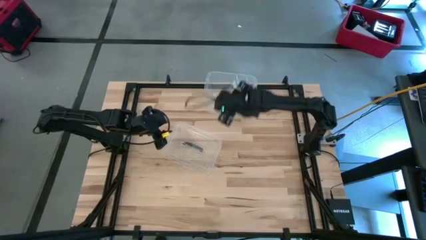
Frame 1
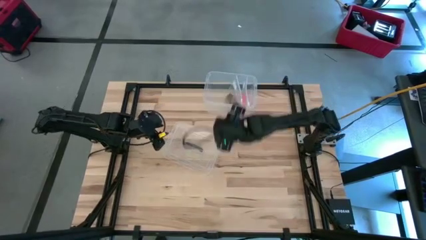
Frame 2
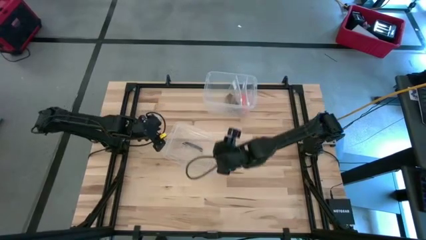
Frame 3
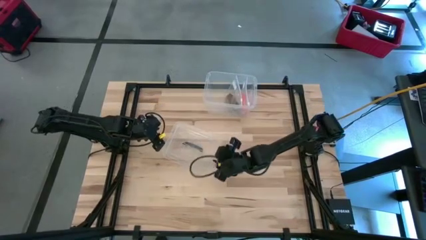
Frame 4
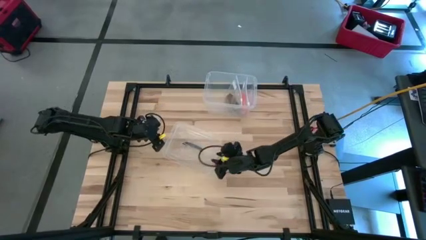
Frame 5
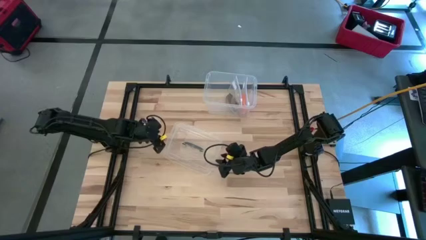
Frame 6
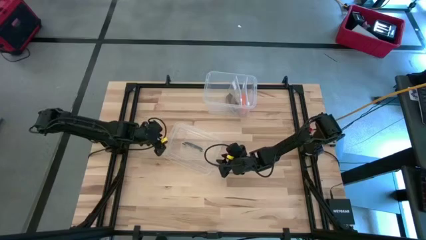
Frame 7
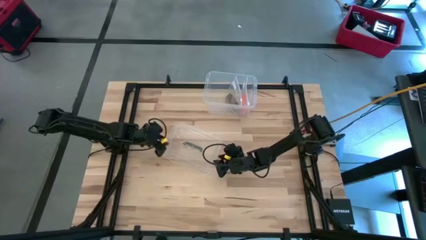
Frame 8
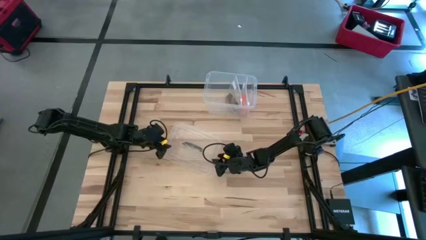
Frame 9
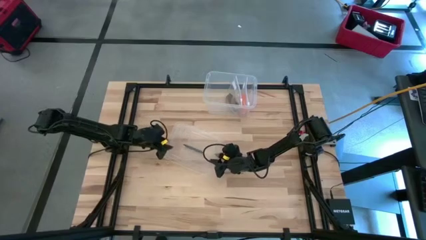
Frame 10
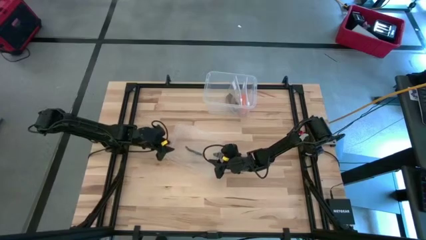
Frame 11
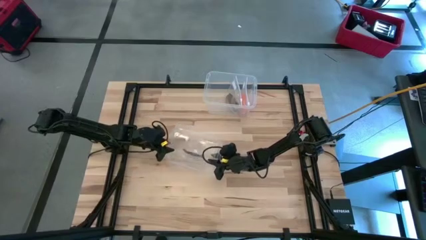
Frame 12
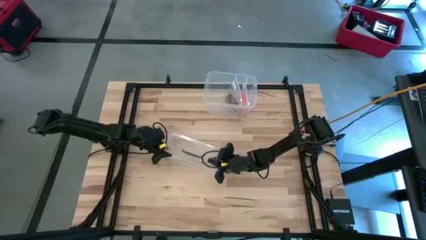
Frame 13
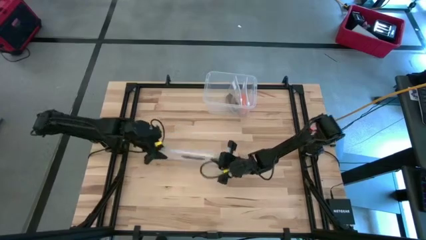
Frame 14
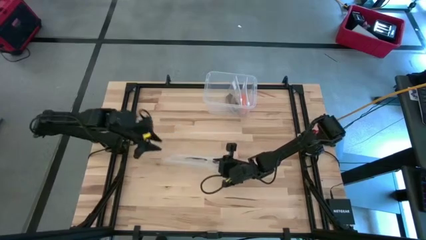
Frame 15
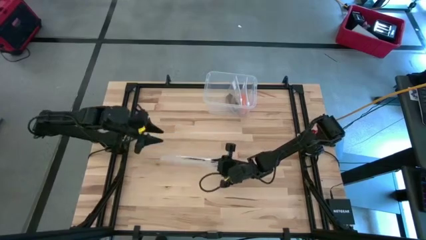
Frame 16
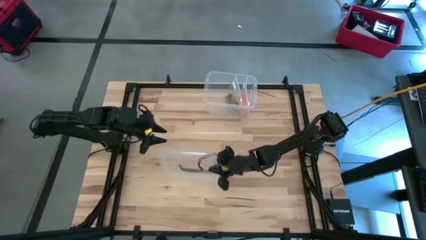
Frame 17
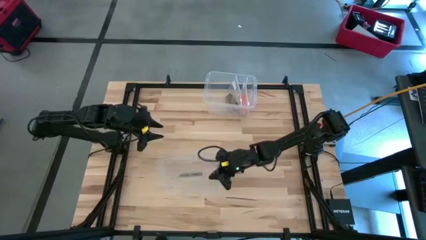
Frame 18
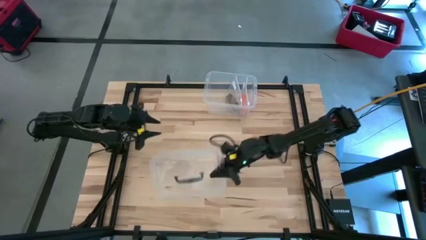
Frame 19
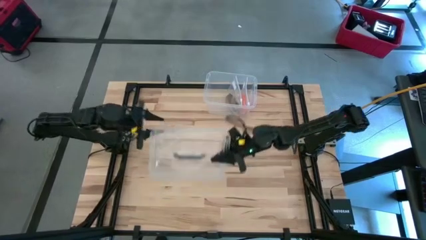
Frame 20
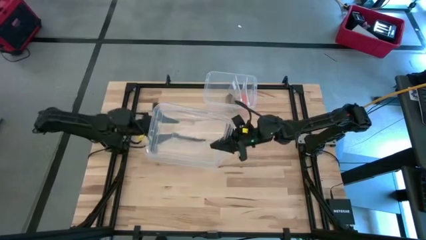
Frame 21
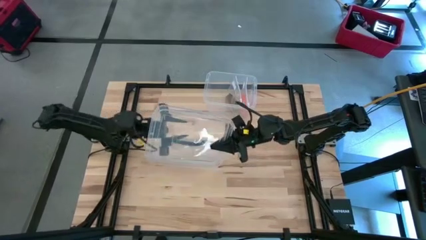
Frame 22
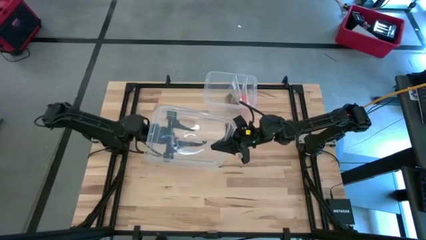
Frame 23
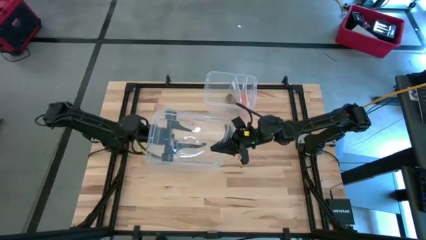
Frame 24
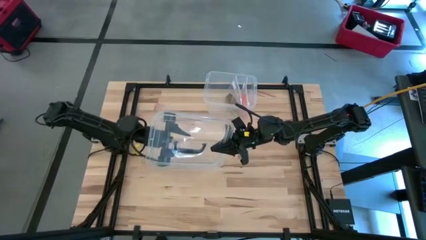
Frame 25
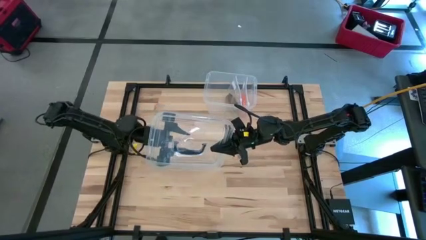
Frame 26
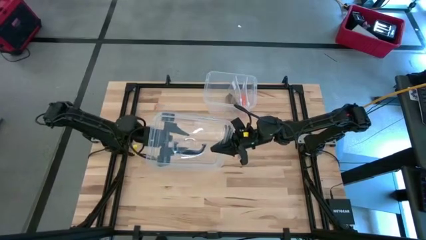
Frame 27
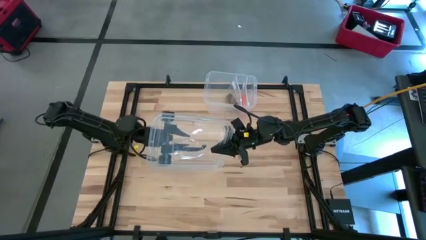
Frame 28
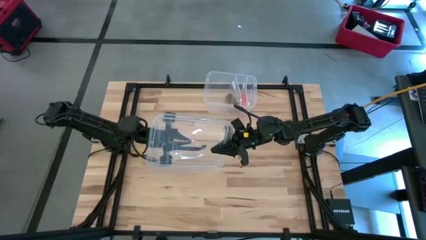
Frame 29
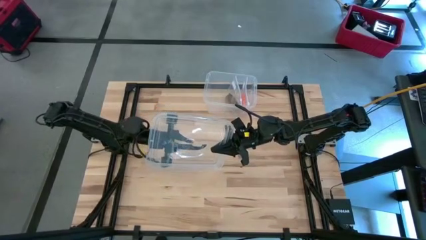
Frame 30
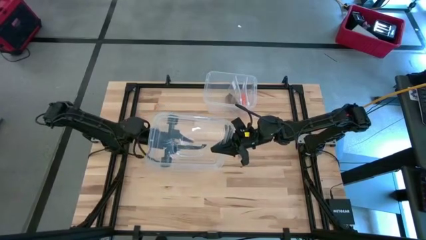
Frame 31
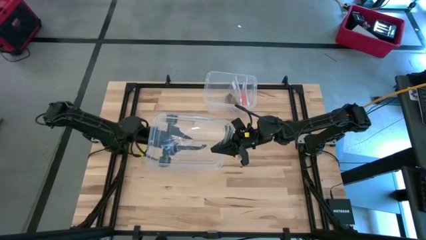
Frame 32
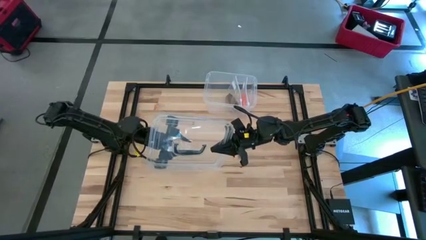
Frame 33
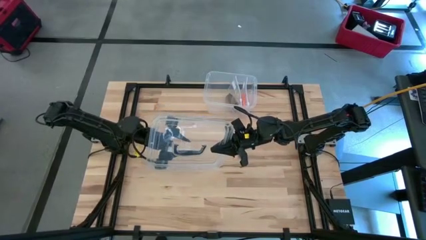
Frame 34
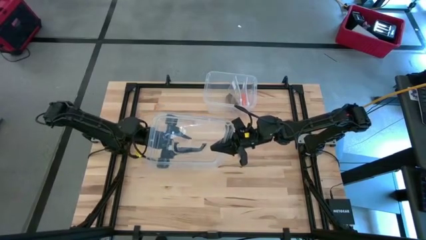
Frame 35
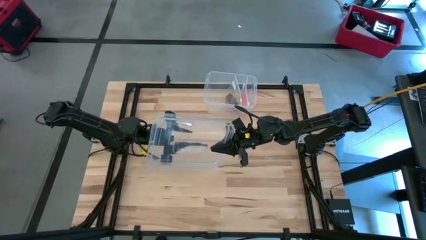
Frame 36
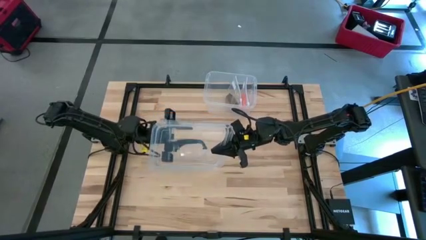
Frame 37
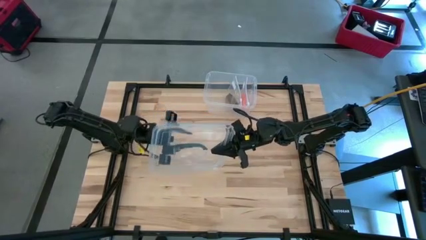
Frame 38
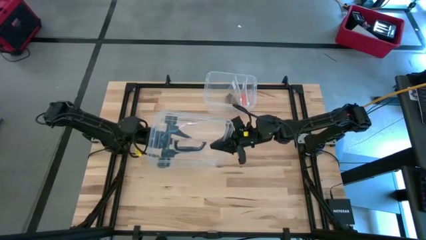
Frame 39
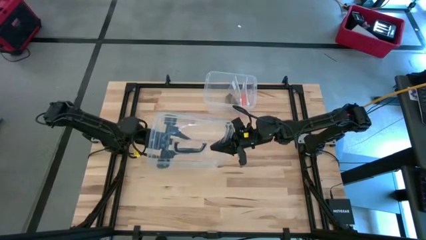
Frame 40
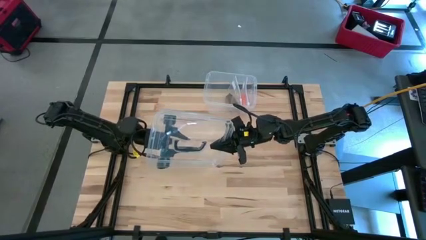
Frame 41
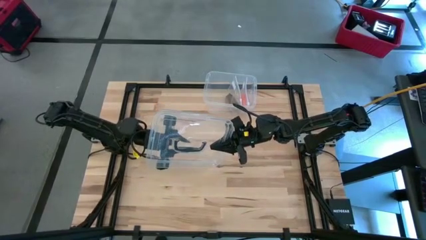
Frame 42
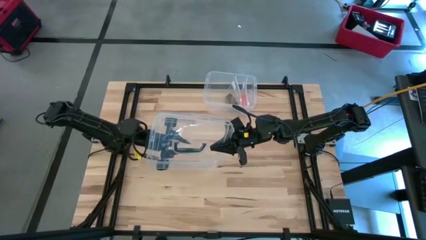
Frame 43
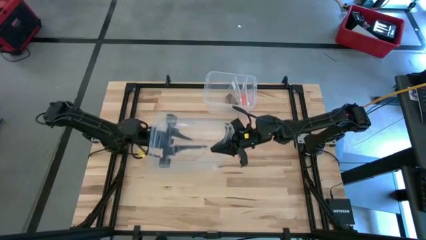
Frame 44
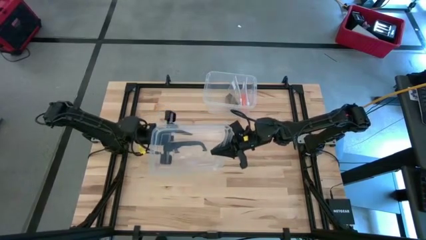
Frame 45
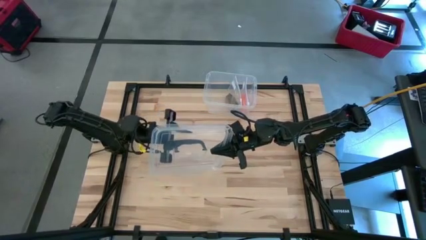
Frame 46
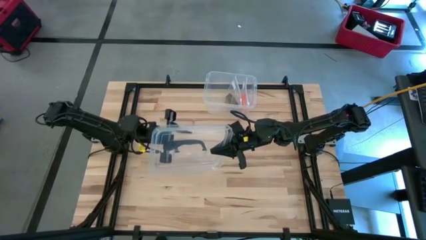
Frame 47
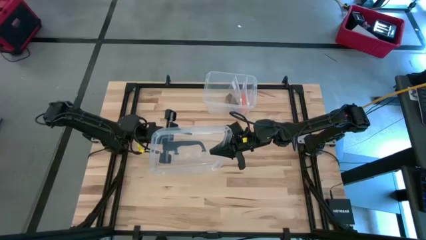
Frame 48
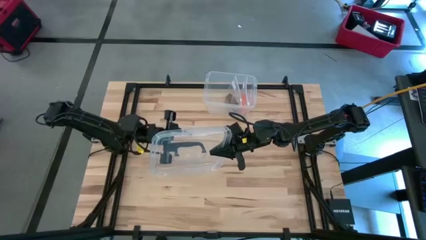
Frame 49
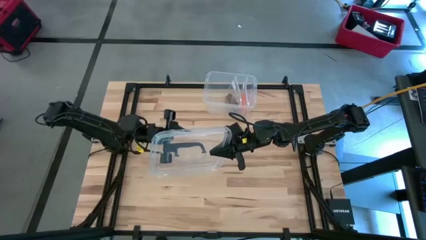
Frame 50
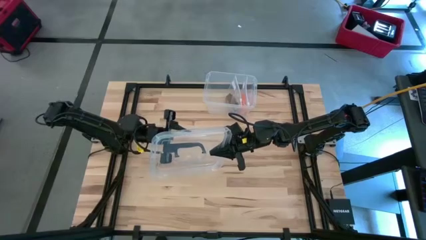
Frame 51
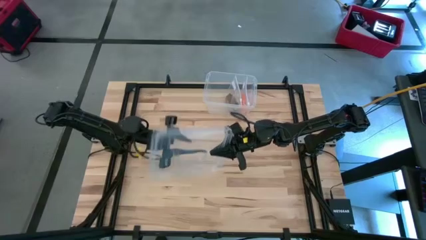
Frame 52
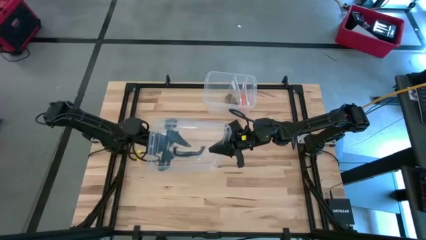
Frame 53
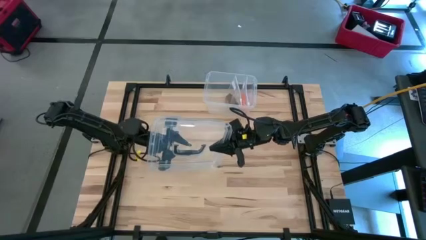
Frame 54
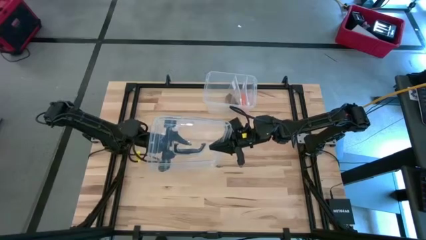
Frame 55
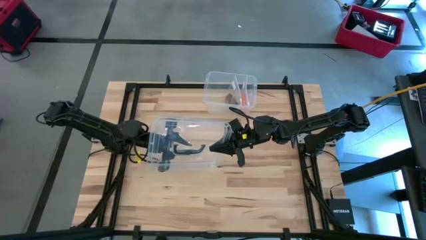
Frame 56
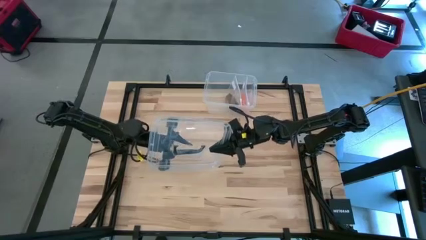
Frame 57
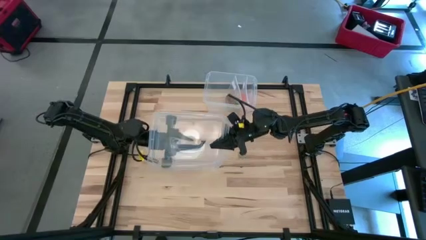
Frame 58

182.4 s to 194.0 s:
Task: Roll bandage
Close the container

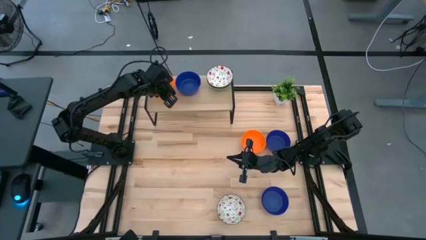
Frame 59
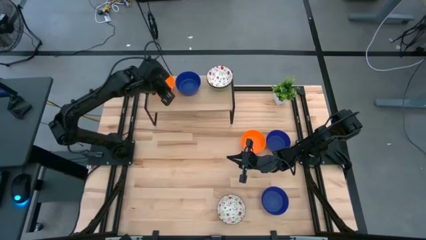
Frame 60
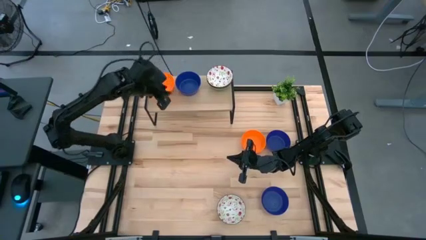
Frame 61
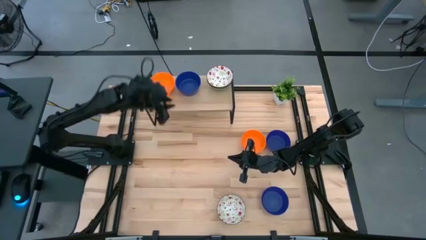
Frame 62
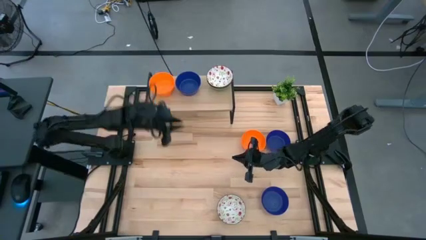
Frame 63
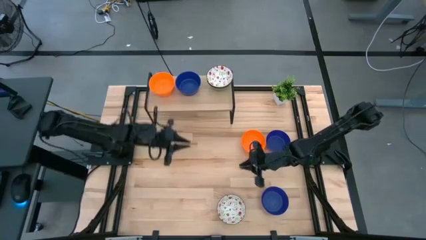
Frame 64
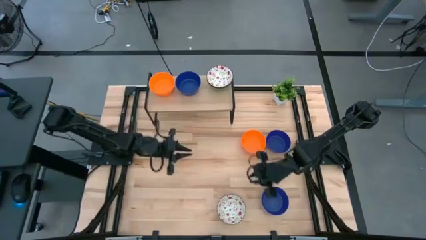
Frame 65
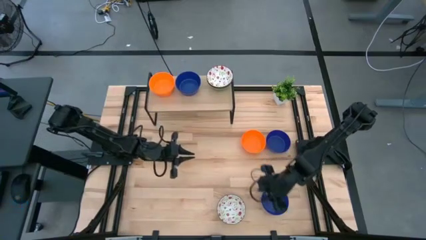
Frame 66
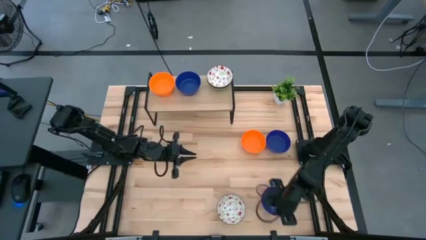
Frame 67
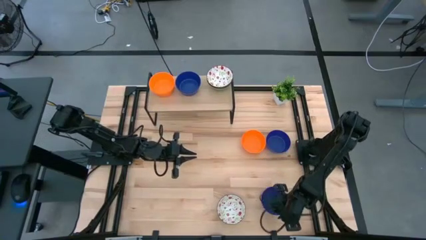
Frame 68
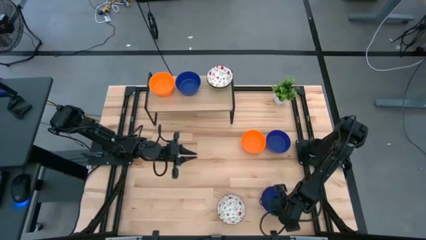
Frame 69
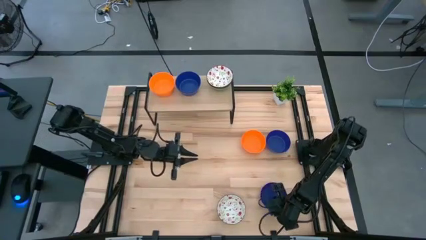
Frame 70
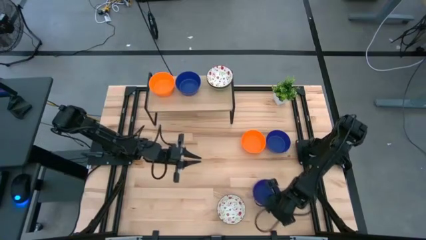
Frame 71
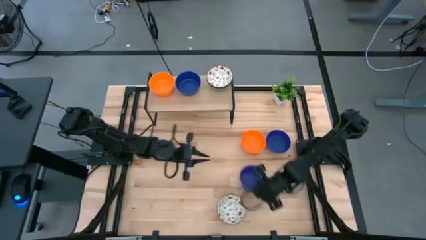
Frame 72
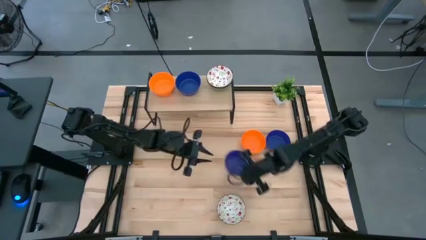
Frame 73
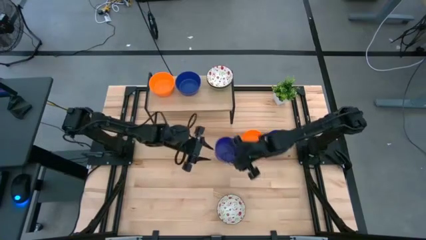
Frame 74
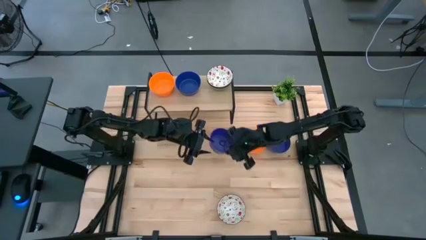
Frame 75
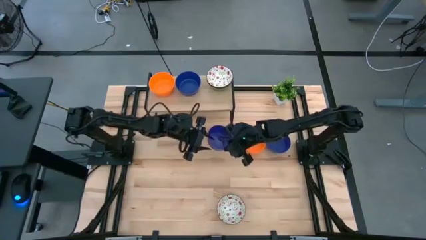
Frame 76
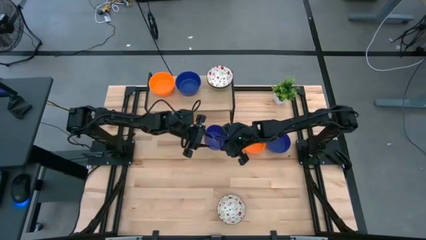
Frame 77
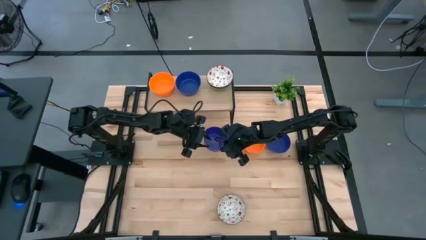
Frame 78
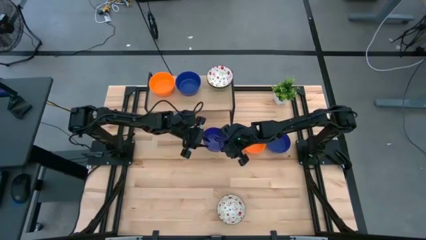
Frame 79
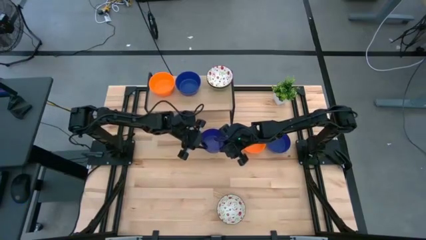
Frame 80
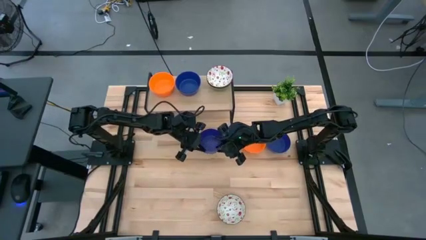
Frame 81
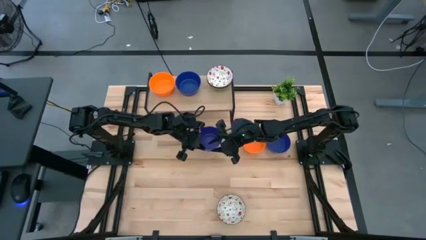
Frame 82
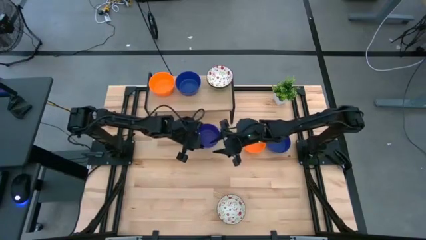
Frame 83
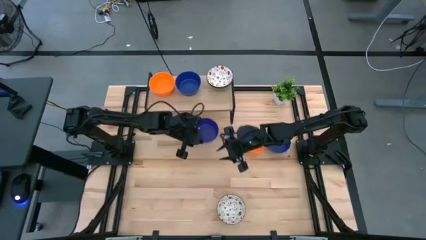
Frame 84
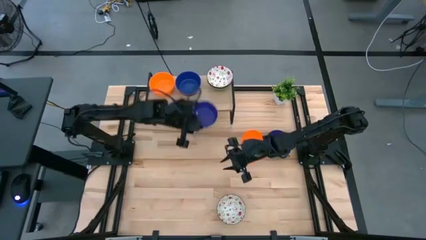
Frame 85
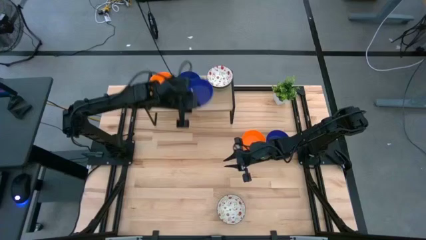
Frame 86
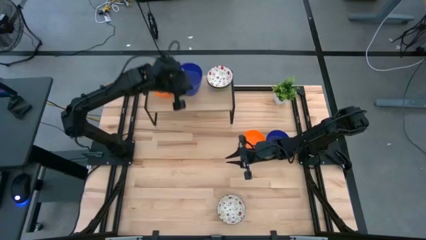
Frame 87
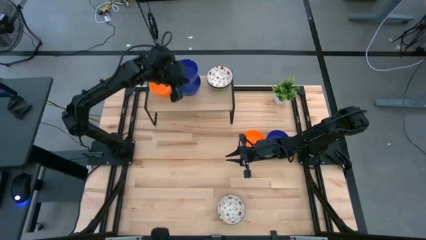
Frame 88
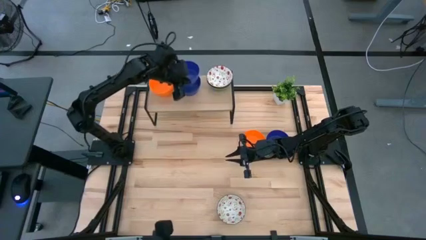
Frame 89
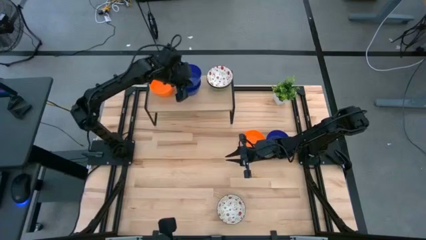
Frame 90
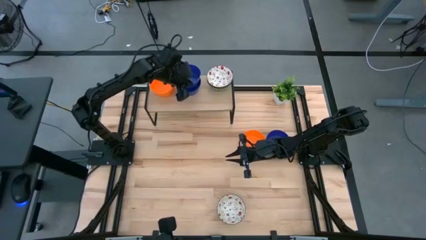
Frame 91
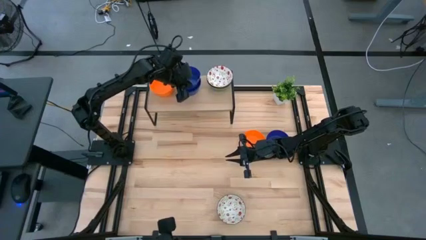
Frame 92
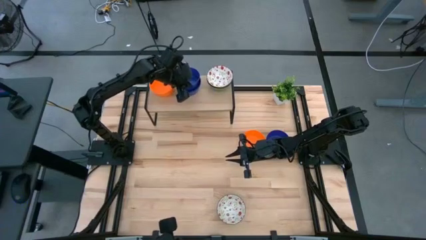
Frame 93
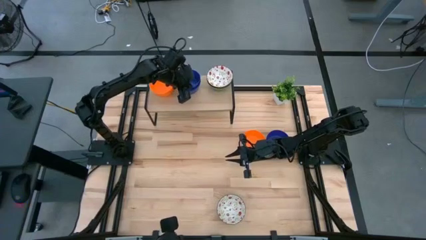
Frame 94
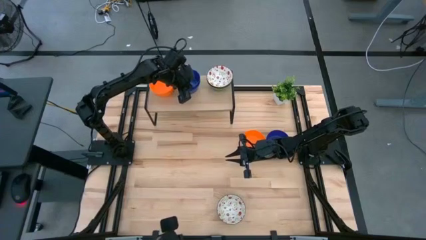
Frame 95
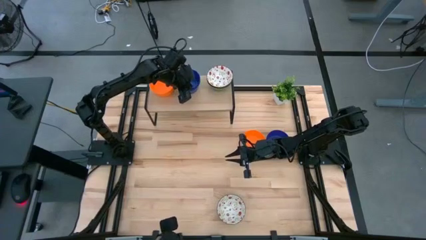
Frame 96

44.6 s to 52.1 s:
Task: Pick & Place Mini bowls
Stack the blue bowl on top of the other blue bowls on the shelf
